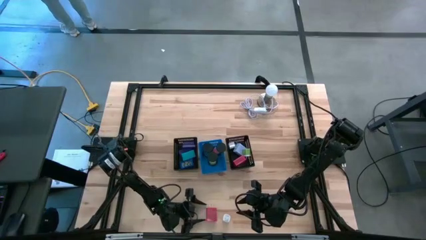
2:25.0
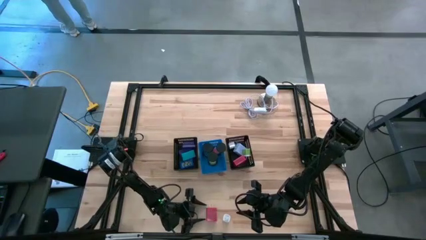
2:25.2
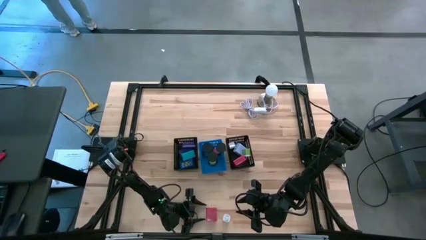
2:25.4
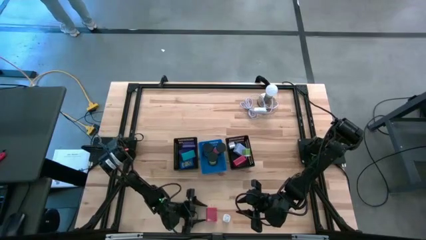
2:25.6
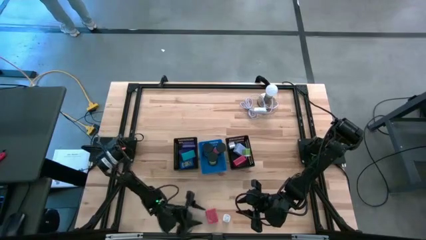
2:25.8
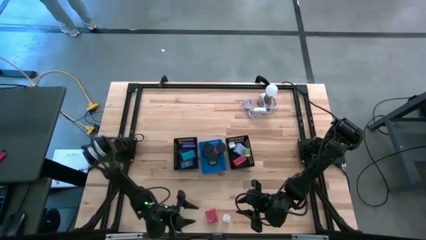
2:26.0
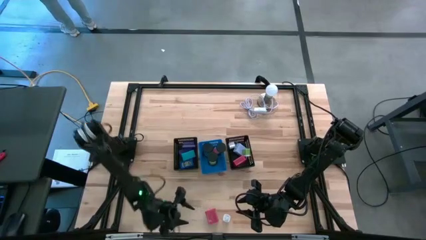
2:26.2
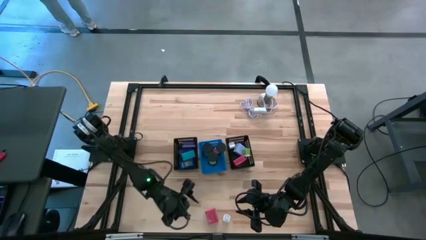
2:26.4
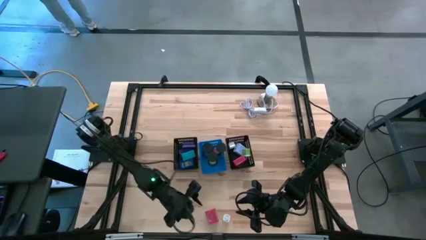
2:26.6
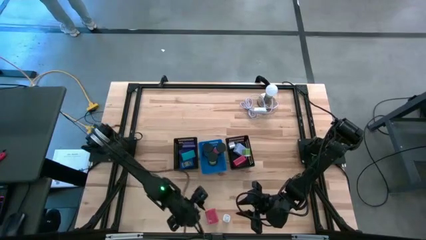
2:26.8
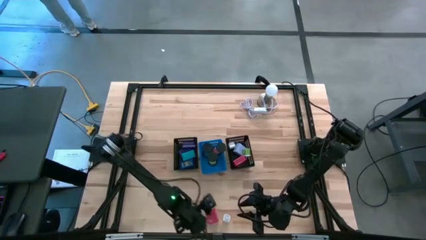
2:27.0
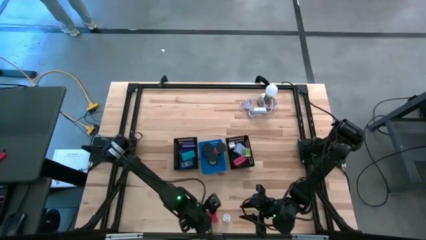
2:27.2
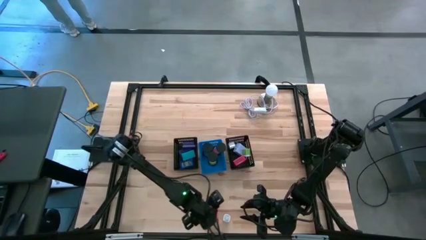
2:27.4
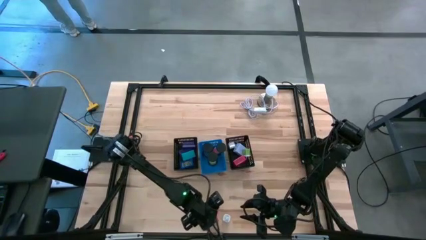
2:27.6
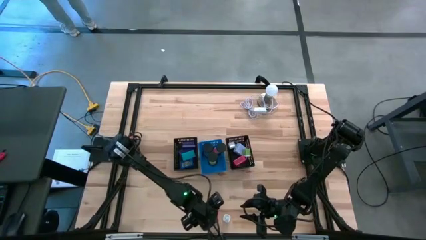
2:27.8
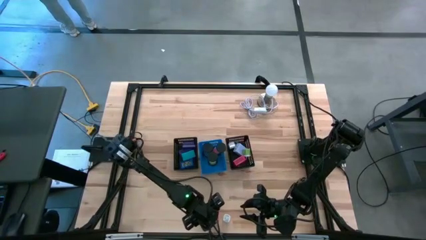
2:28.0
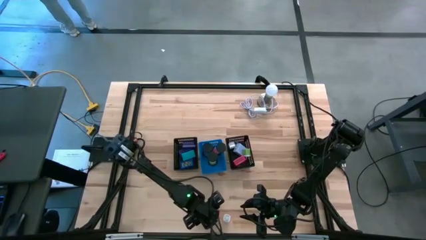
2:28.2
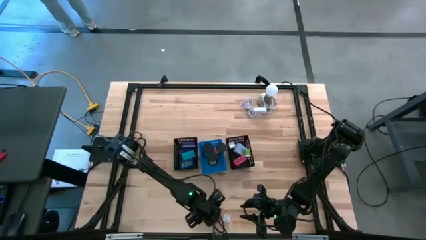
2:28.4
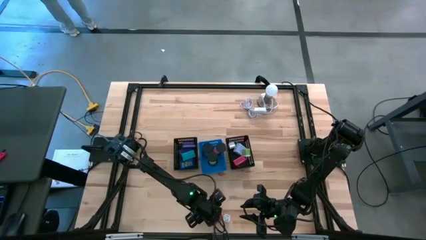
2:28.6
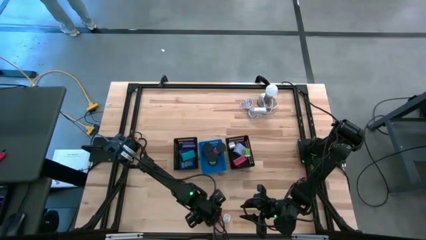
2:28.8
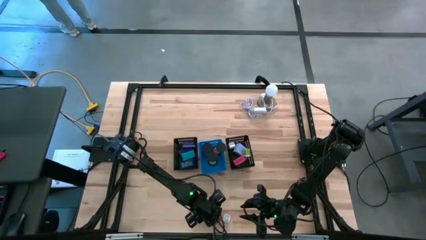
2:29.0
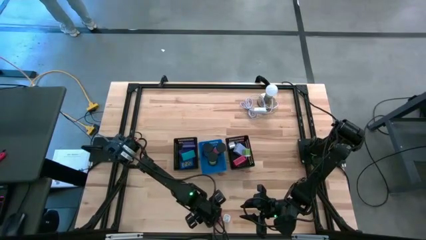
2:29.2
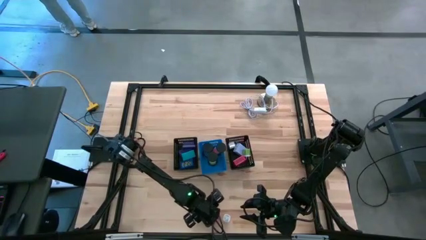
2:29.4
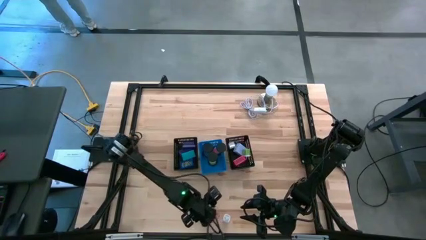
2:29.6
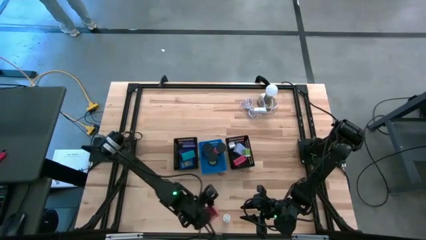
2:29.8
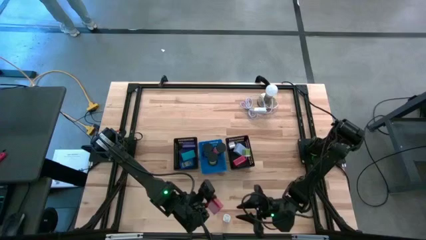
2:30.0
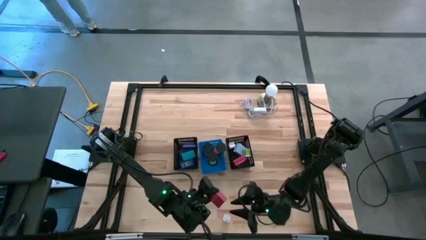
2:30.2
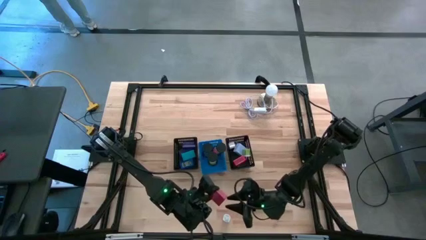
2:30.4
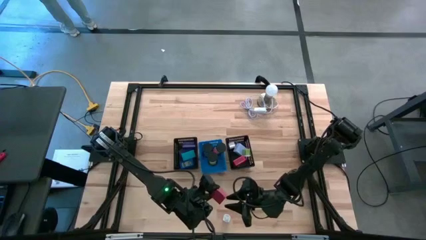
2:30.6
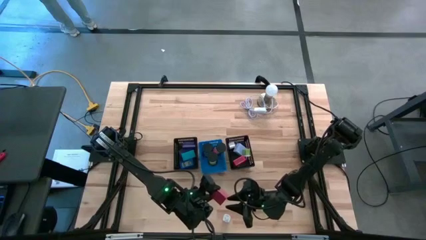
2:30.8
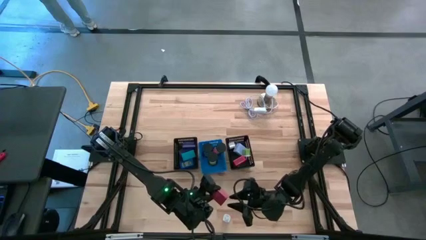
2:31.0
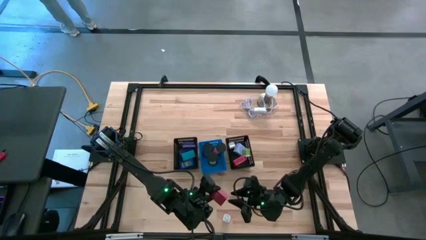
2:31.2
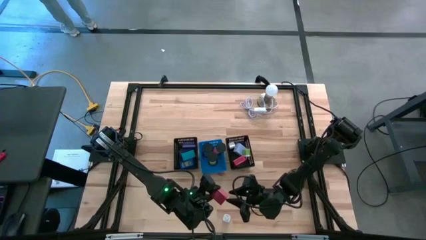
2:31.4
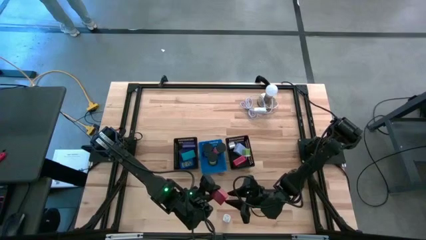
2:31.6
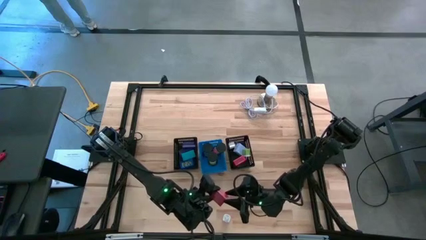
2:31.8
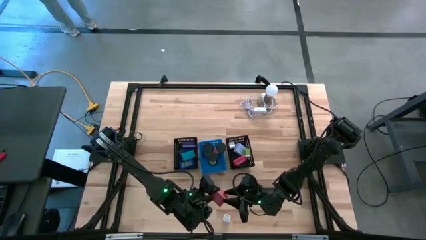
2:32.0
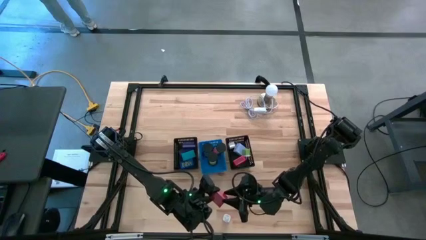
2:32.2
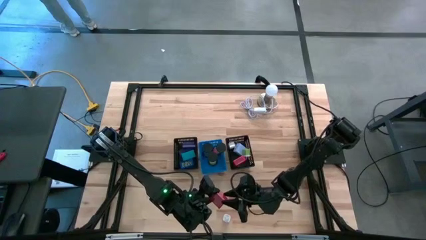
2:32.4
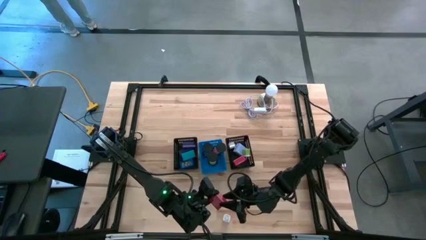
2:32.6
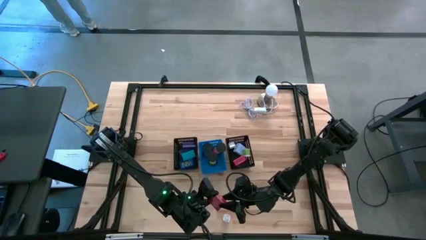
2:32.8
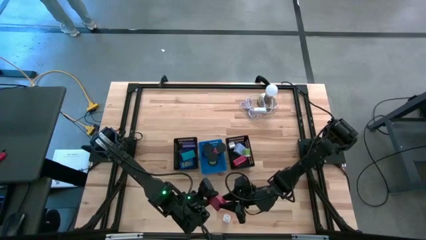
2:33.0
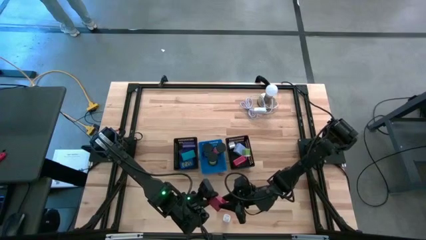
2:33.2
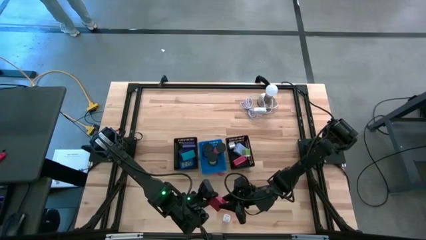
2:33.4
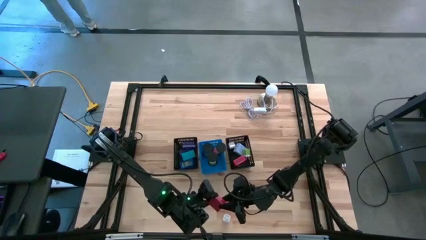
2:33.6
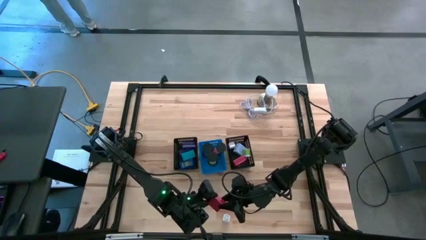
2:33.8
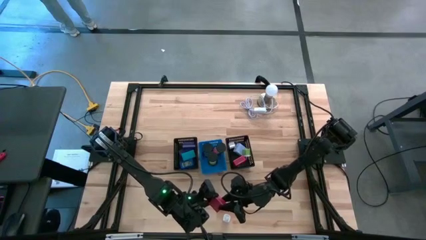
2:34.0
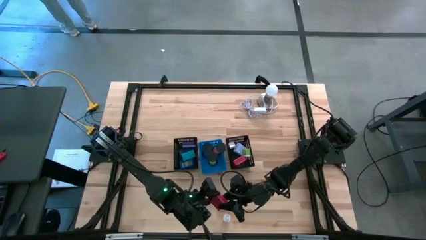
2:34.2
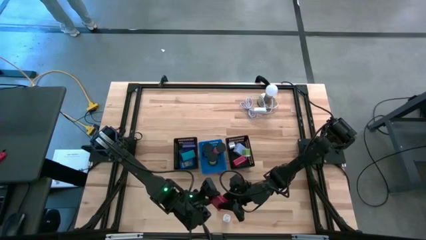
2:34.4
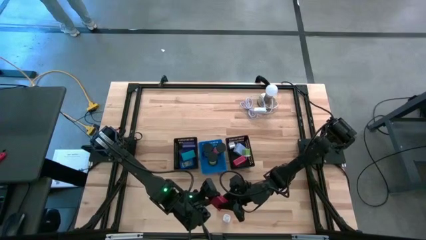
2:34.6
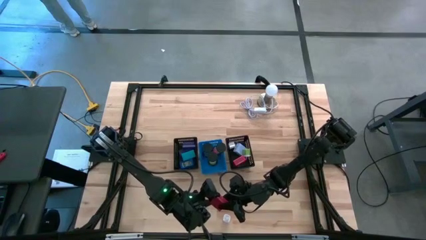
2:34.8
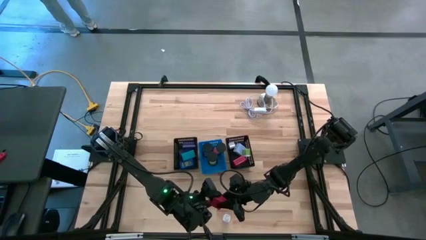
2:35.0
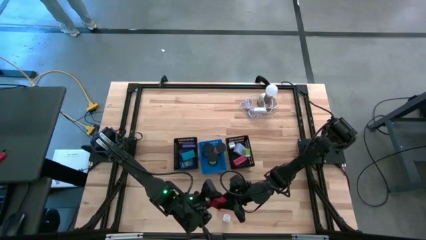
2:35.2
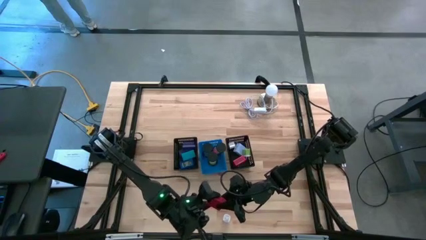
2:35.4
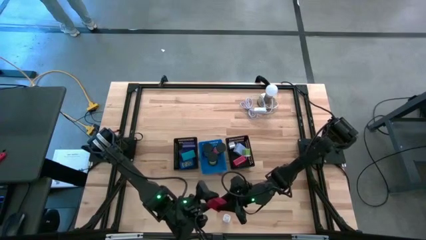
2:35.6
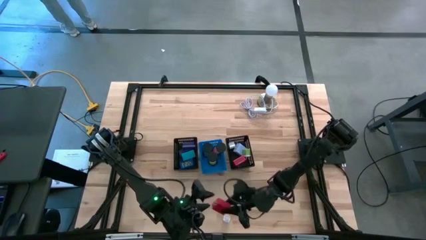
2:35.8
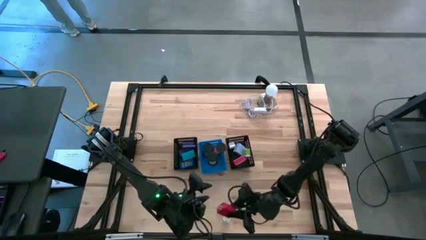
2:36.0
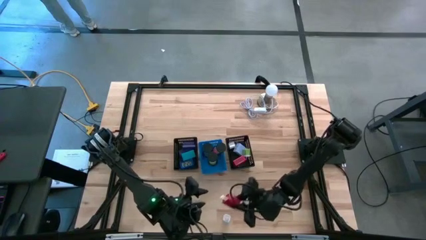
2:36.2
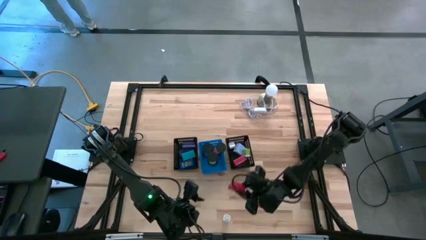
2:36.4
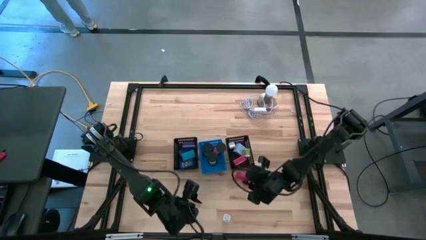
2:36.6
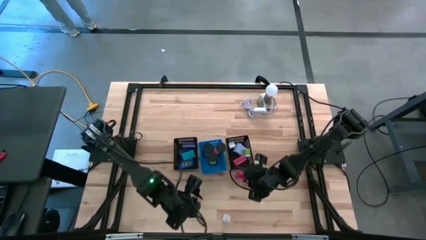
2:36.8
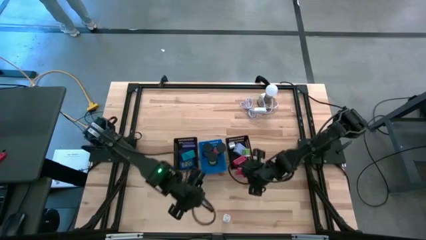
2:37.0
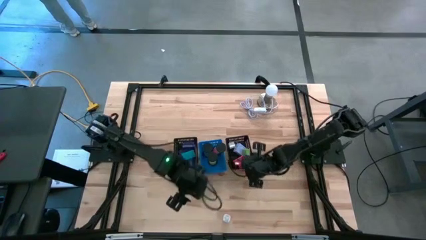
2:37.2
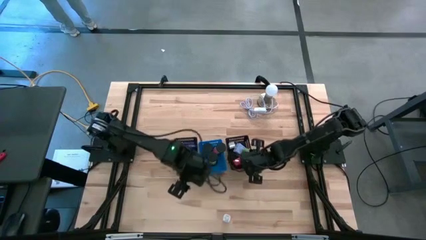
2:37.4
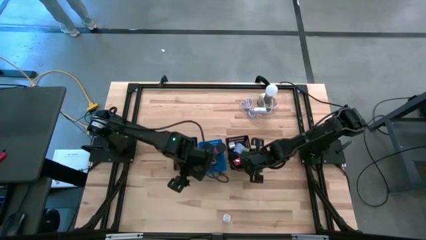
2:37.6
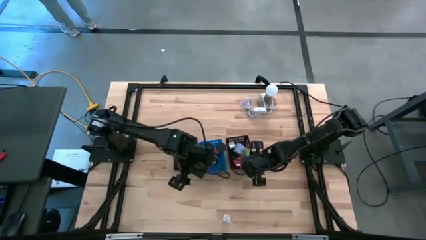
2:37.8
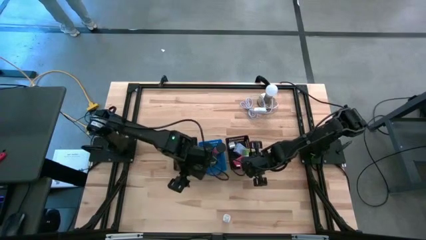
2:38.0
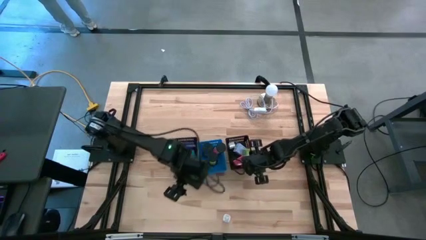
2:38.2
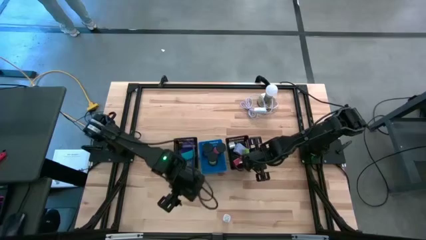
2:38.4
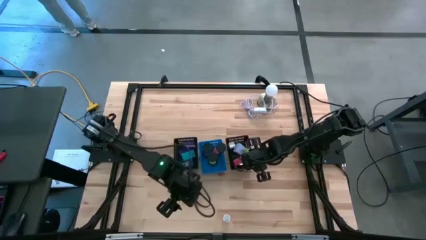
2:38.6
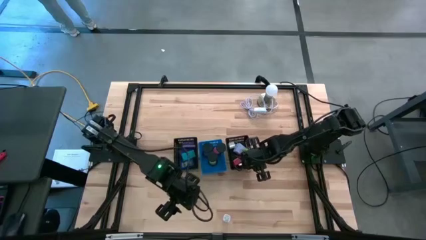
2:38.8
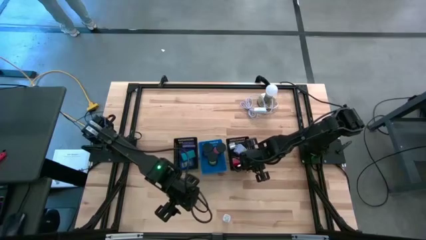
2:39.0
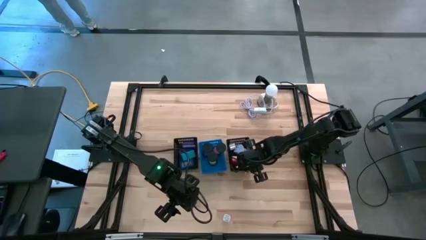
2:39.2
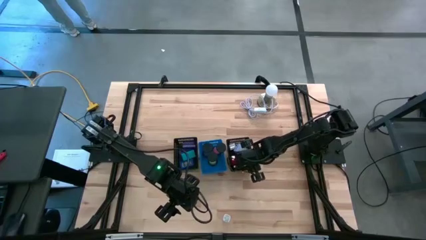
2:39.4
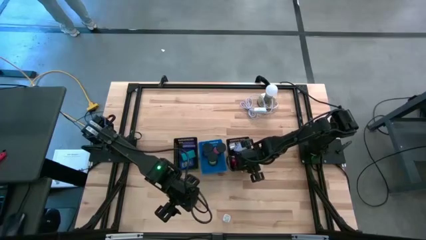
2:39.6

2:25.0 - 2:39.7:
Task: Pick & Place Office items
Put the red charger adapter into the right black bin
